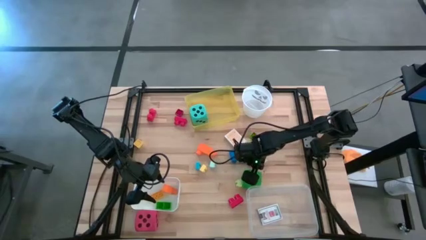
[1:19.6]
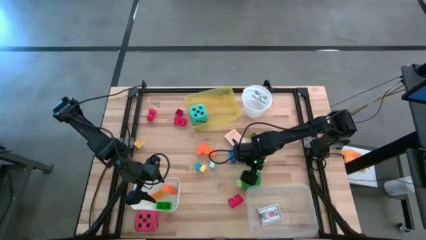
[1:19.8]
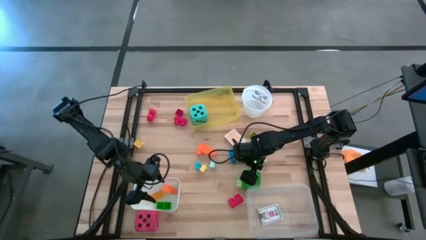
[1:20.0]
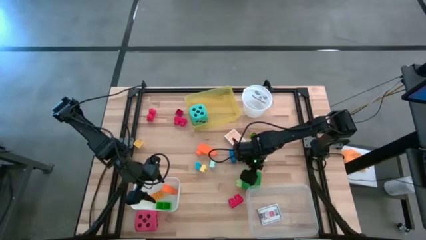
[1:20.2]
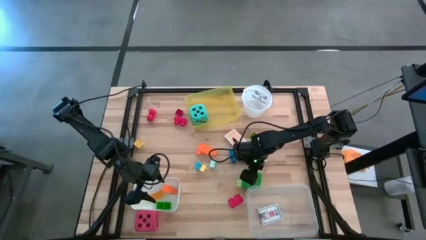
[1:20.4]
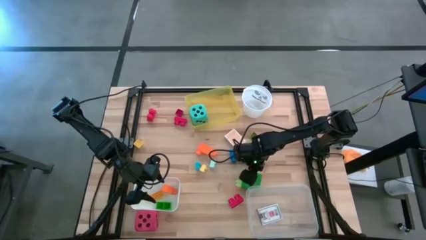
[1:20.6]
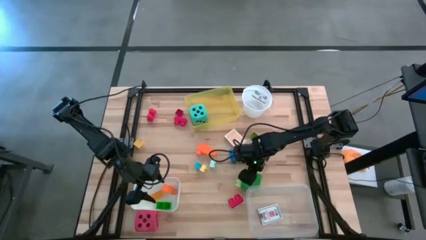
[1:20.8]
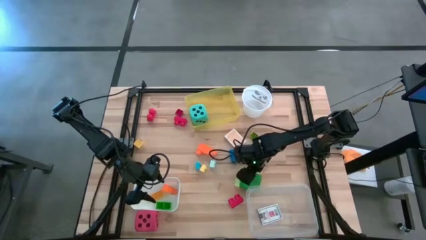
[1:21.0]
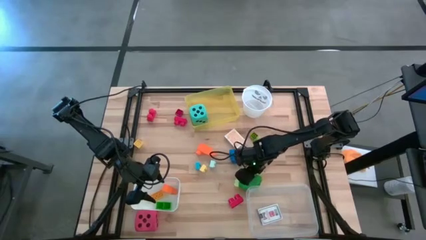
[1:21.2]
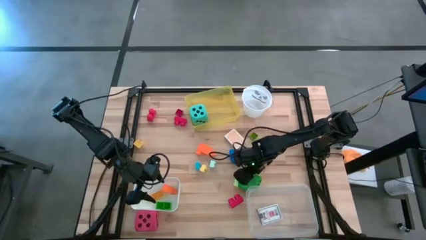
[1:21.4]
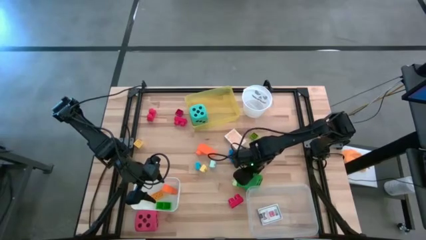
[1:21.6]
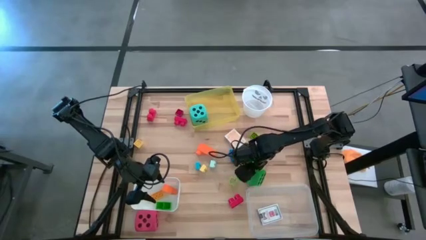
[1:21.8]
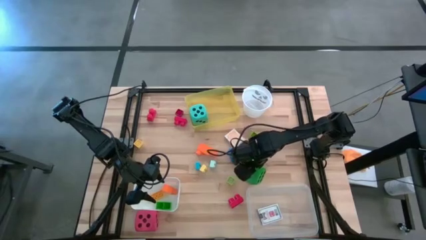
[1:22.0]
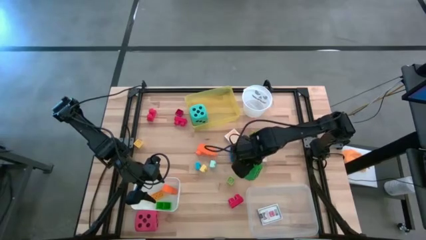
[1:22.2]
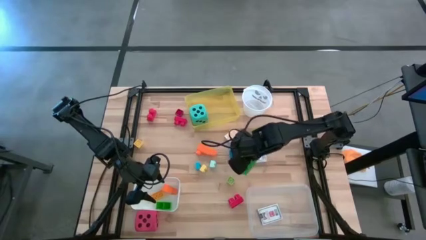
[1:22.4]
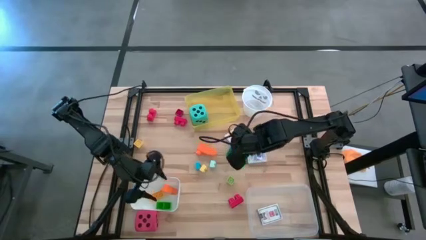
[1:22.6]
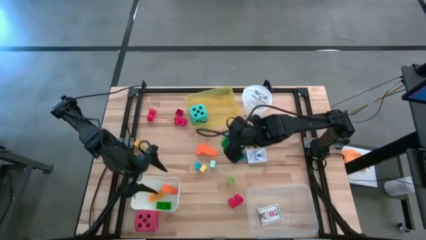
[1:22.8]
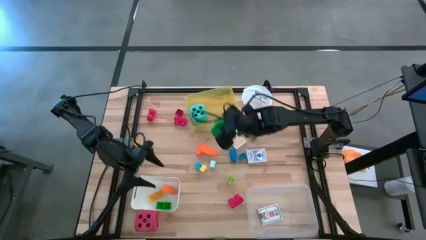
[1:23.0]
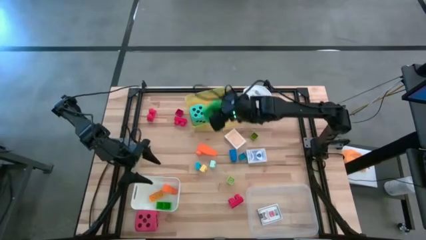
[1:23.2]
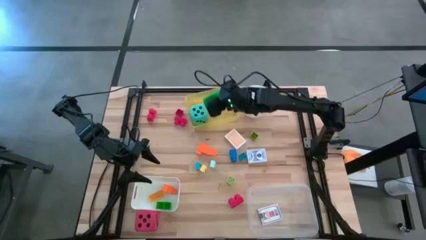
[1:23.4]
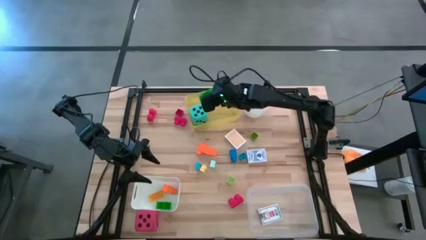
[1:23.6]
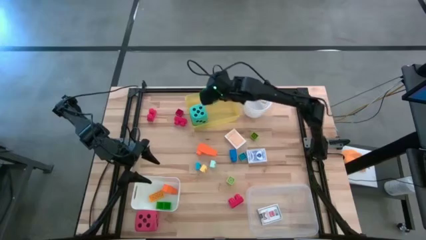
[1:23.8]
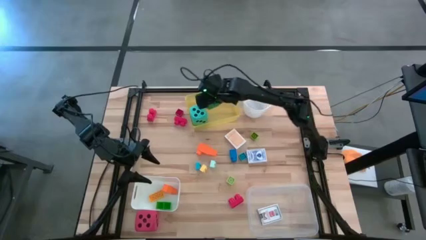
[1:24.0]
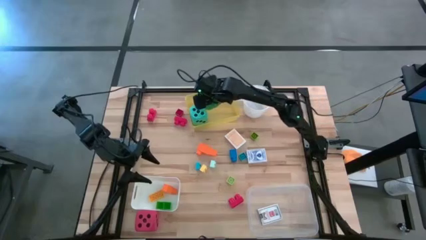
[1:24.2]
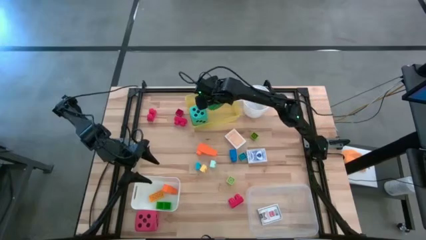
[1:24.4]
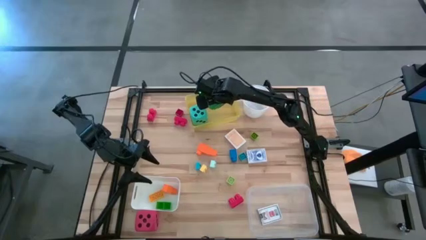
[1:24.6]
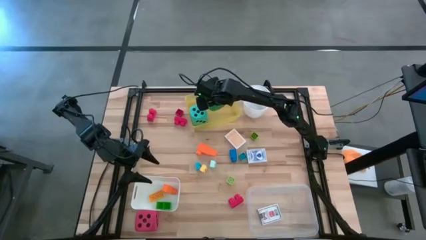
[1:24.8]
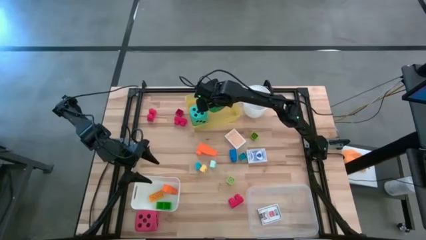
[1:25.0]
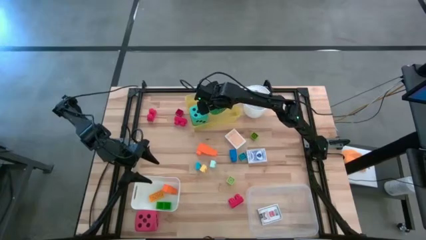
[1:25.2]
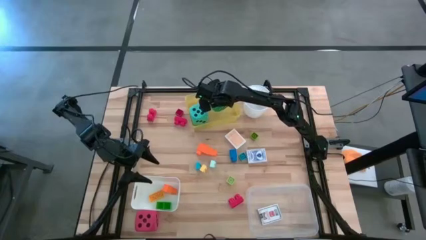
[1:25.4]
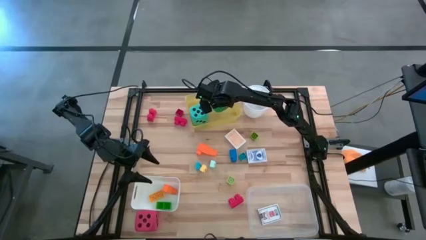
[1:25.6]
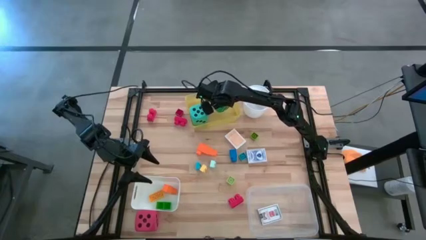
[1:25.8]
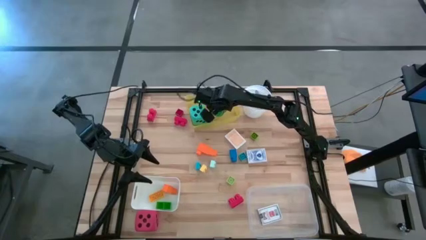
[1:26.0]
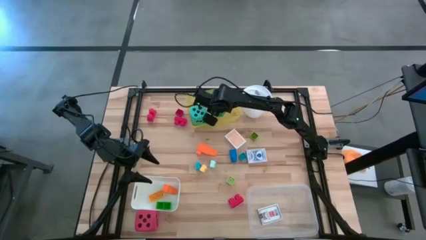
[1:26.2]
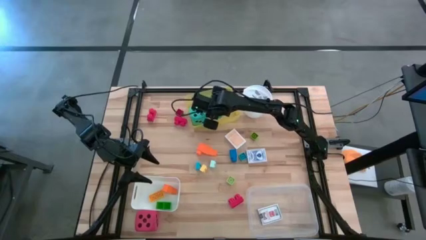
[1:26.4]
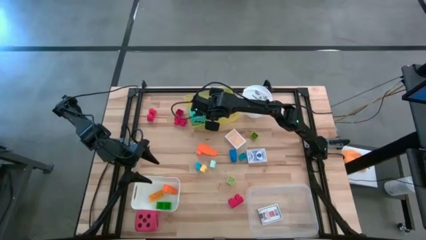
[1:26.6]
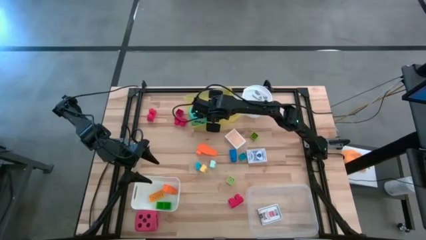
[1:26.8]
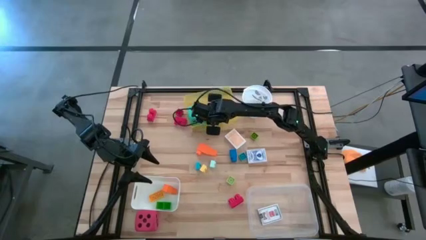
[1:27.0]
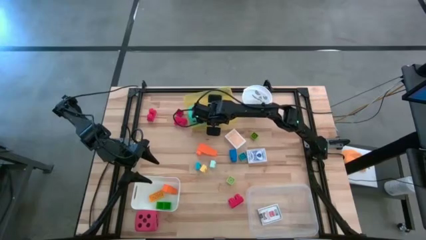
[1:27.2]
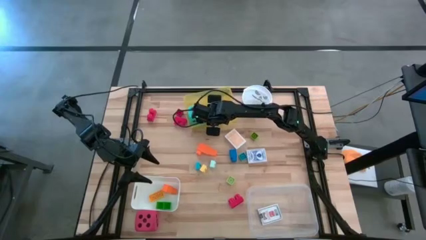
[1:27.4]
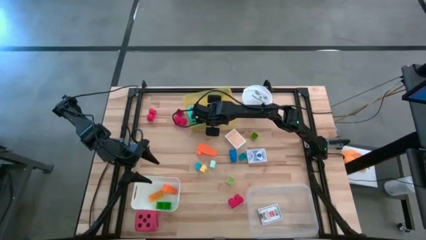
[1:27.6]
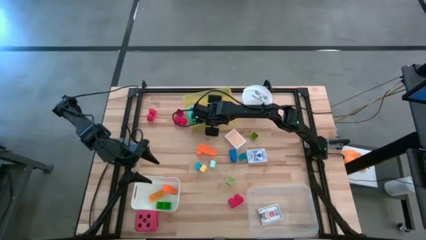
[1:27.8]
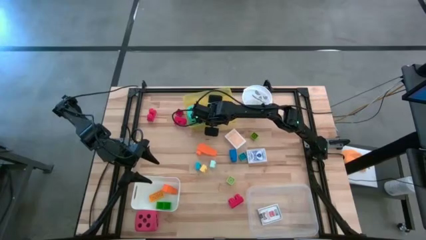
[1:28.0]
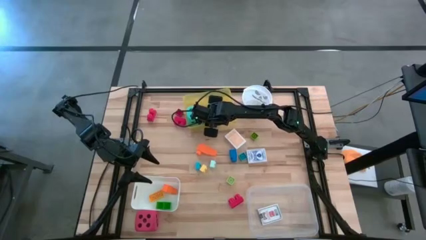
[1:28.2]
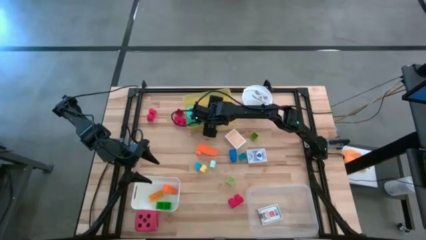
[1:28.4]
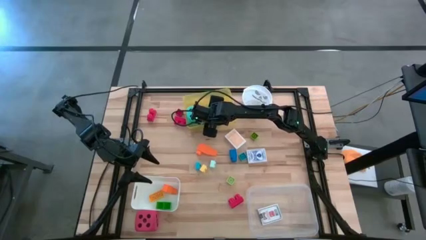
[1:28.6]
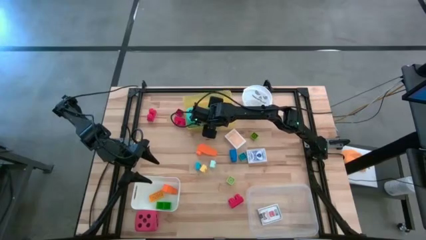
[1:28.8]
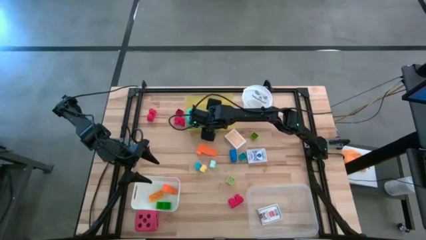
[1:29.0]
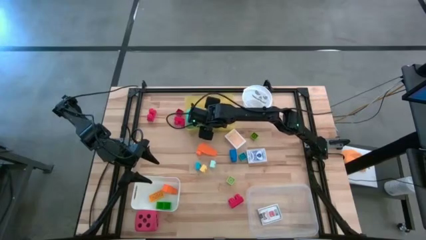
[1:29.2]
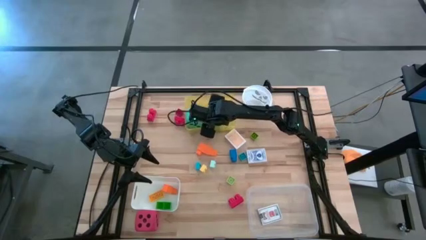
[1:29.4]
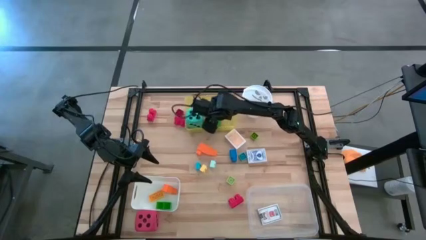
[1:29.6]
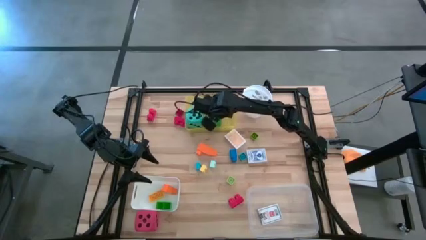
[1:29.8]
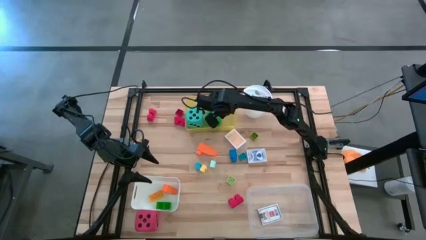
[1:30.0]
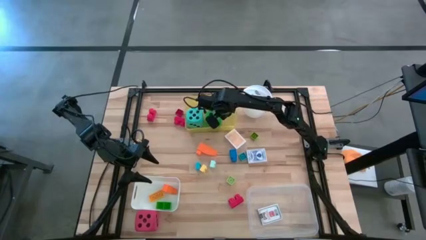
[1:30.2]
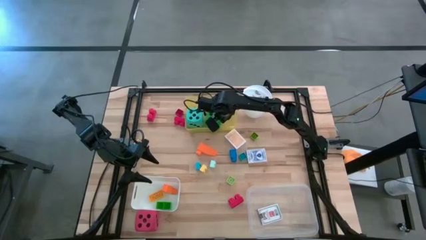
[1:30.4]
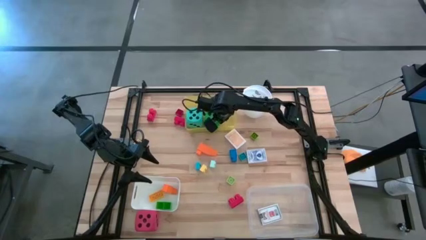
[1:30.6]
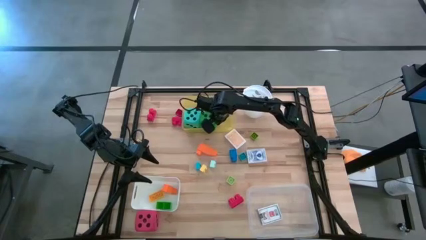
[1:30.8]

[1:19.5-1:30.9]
Task: Pick & Place Toys
Put the green die into the yellow bin

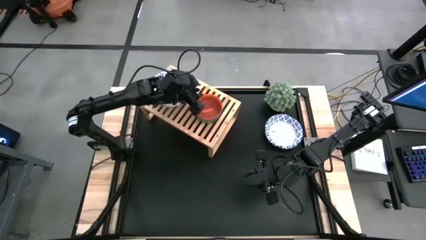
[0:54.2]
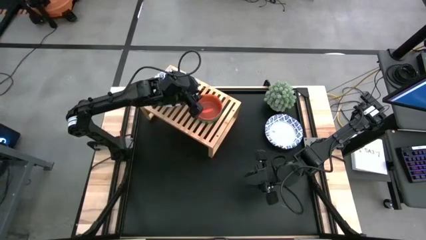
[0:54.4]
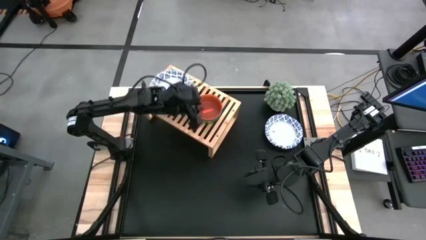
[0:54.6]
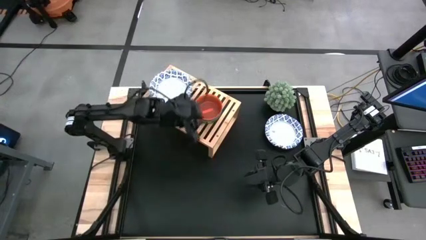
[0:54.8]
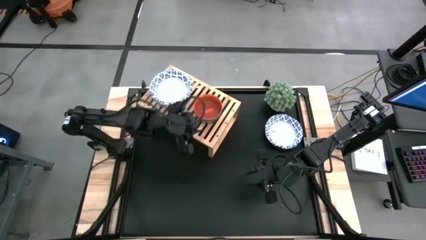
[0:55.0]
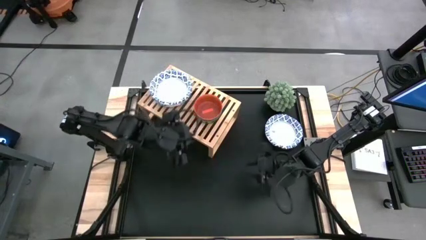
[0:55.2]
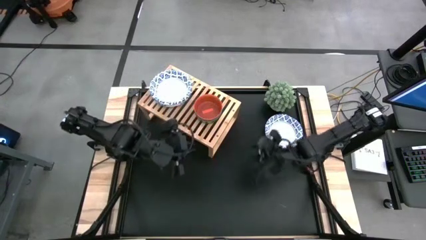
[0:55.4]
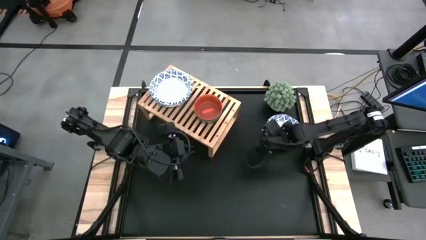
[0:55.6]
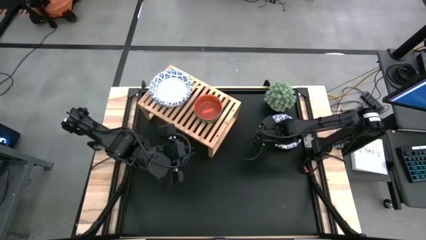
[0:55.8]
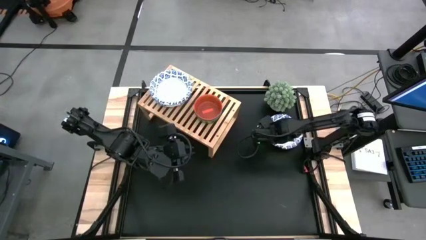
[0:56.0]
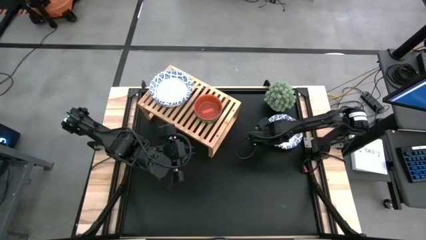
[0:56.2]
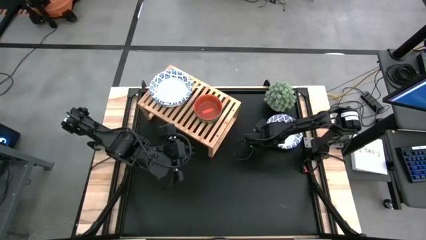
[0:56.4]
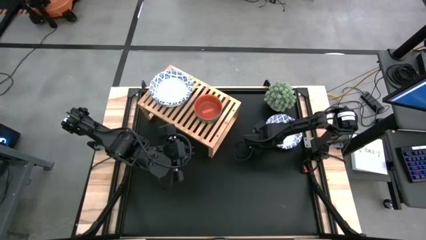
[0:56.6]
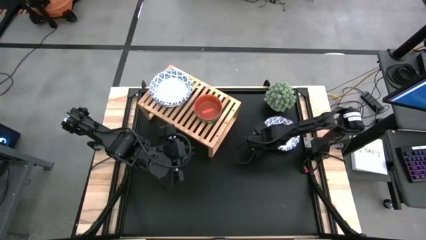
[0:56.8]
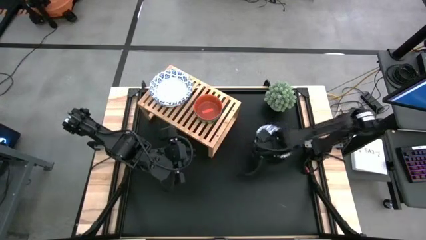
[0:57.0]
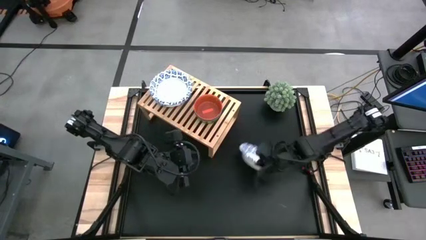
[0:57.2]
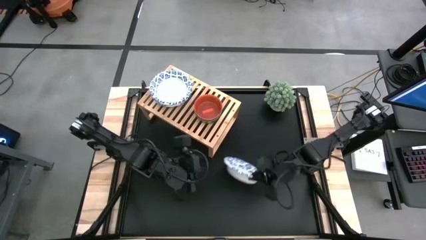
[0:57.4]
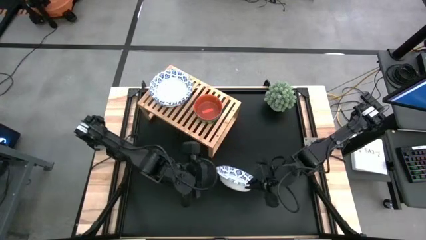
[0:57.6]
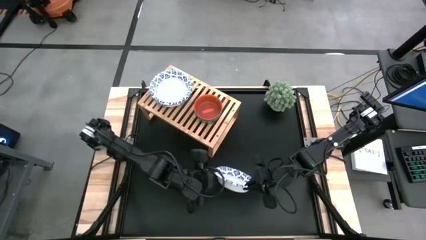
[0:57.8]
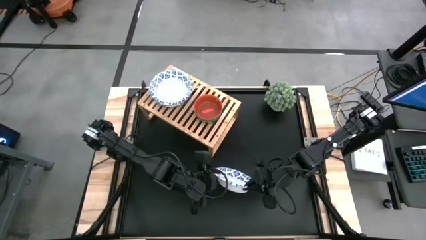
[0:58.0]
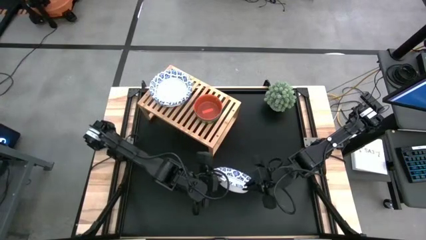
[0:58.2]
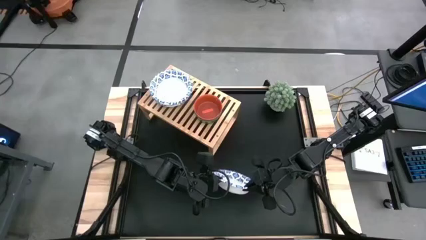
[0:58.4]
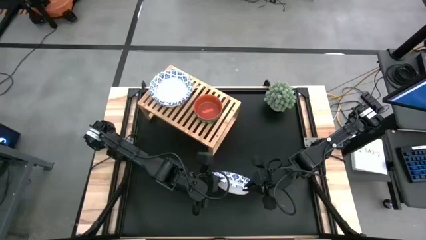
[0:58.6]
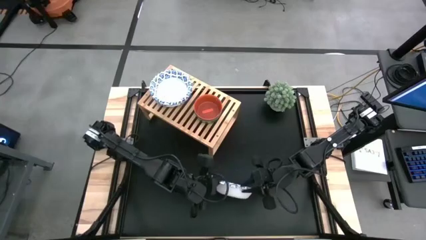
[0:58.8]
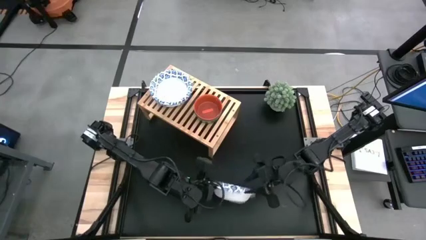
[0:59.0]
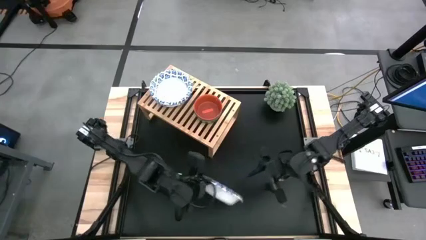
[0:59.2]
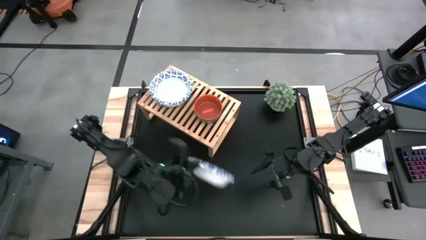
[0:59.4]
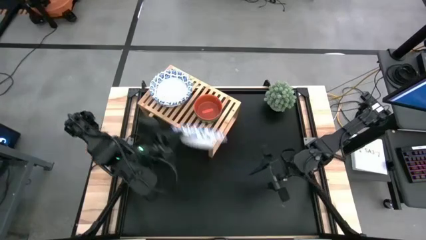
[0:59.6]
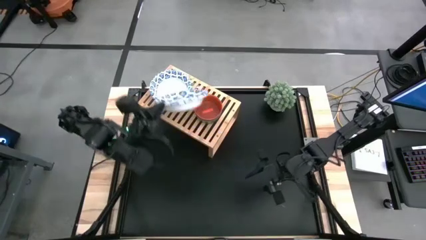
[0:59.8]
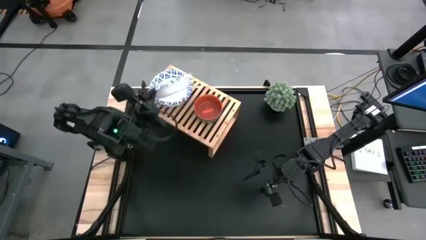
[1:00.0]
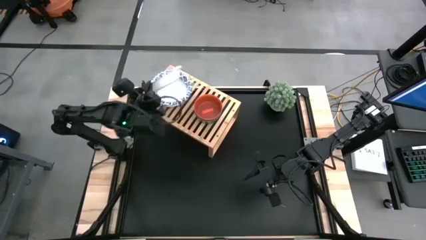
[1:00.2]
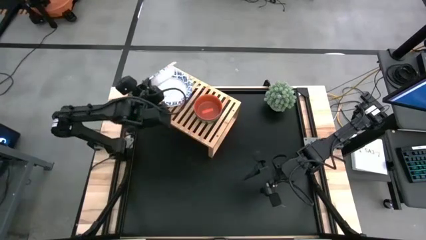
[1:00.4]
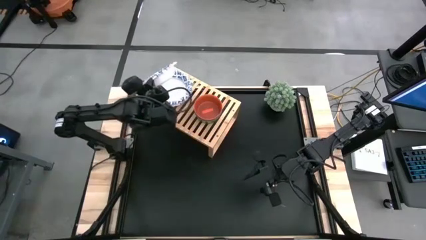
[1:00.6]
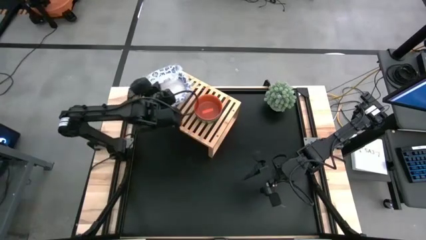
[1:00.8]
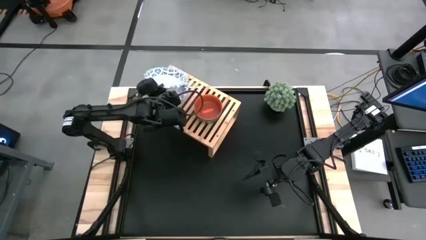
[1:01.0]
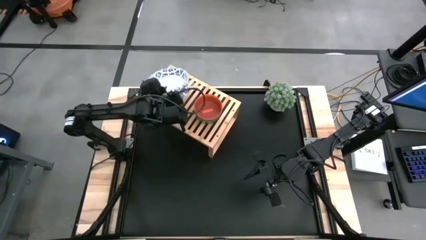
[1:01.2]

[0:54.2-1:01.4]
Task: Place and stack bowls onto a shelf
Stack the white patterned bowl into the white patterned bowl
